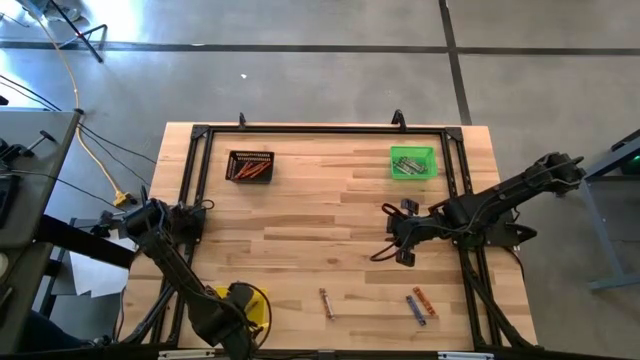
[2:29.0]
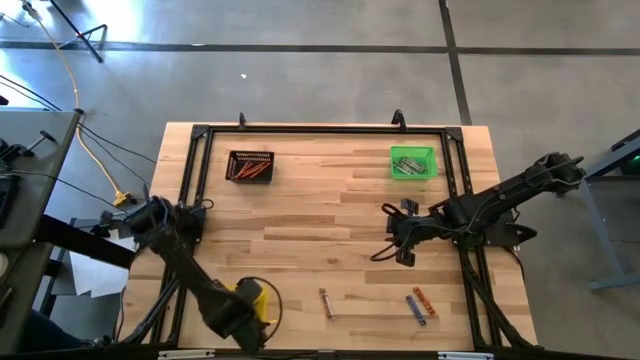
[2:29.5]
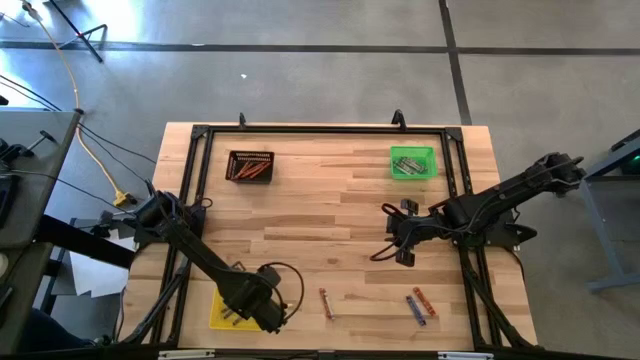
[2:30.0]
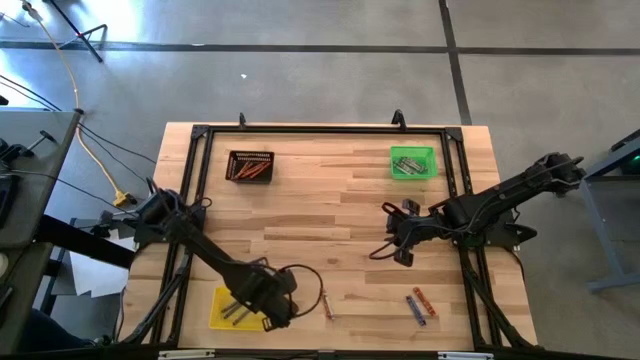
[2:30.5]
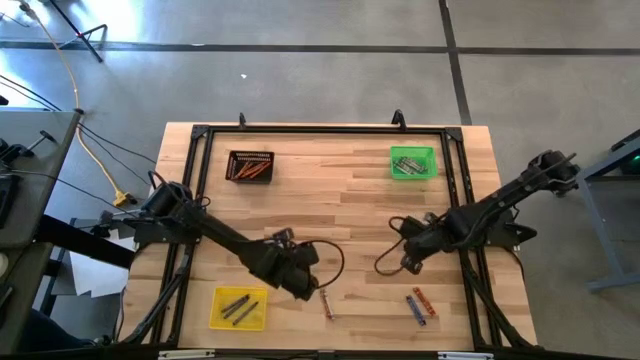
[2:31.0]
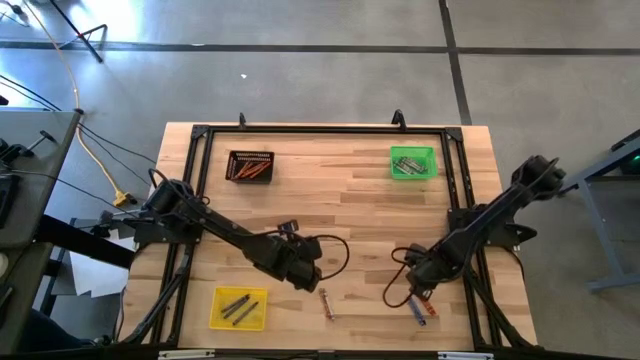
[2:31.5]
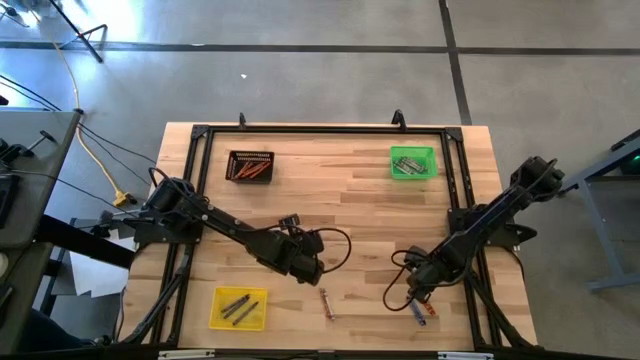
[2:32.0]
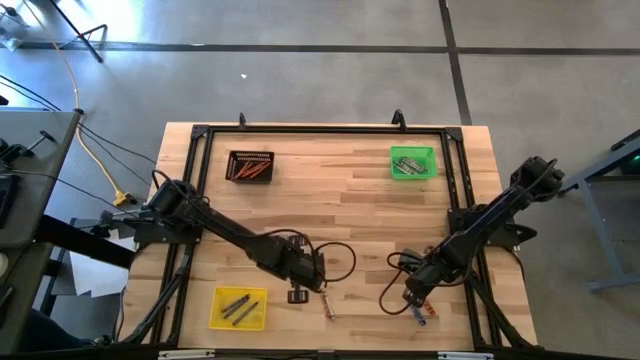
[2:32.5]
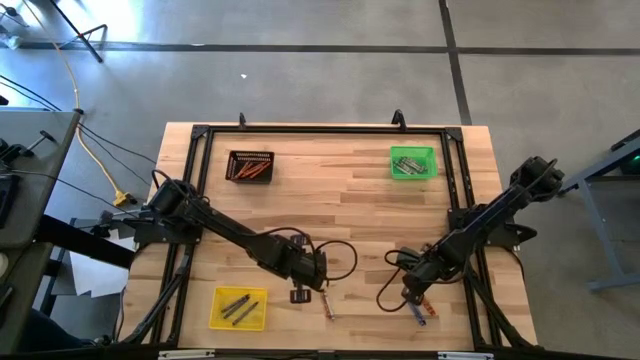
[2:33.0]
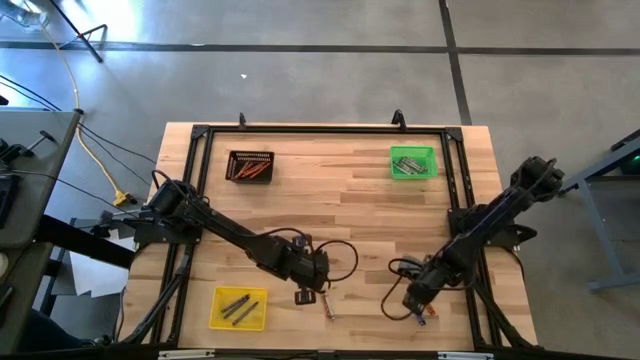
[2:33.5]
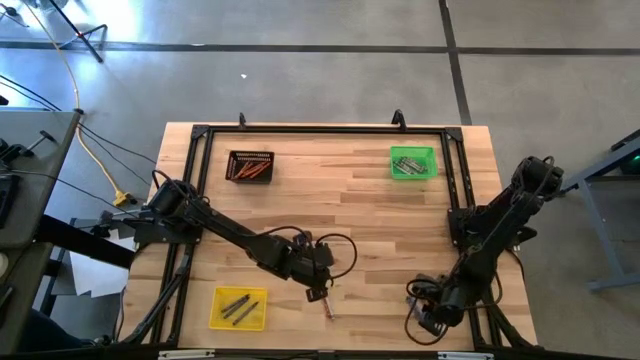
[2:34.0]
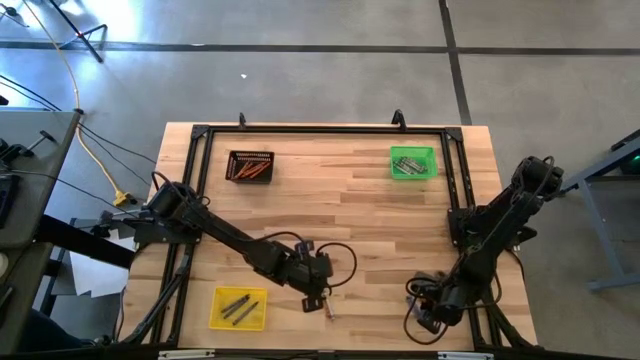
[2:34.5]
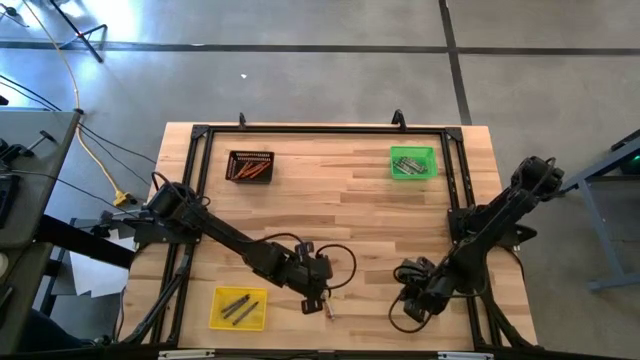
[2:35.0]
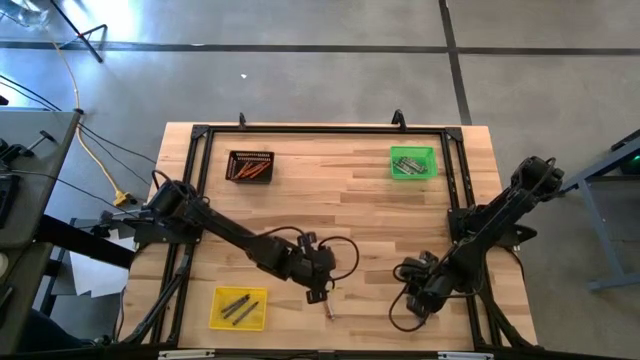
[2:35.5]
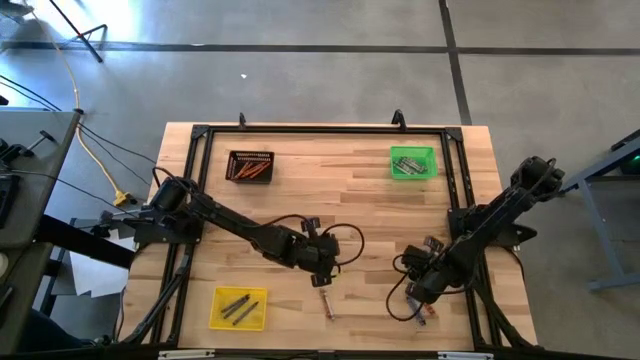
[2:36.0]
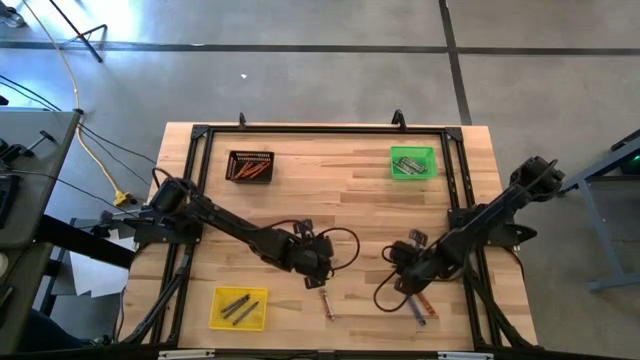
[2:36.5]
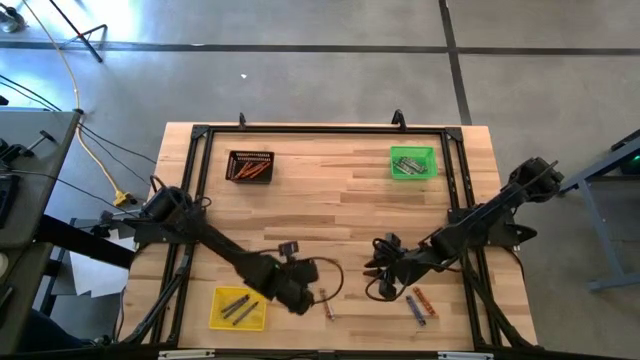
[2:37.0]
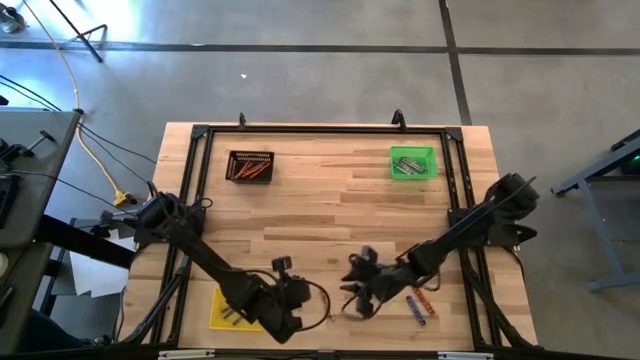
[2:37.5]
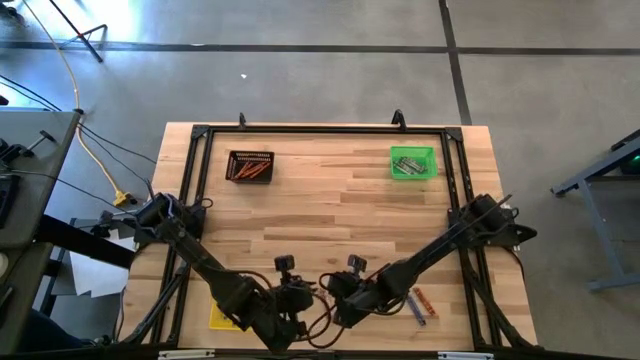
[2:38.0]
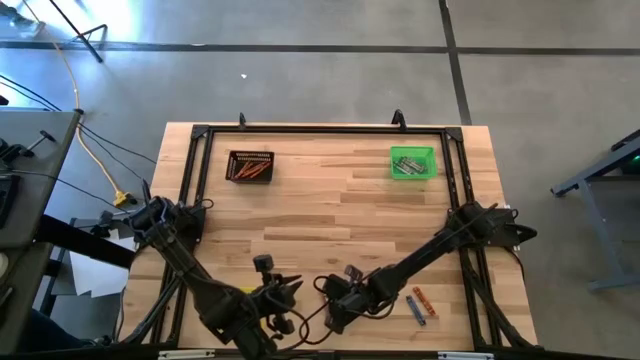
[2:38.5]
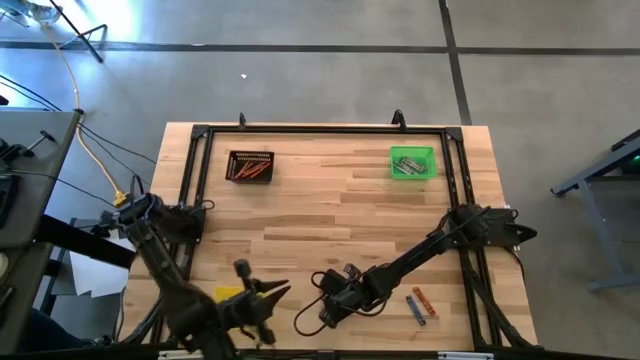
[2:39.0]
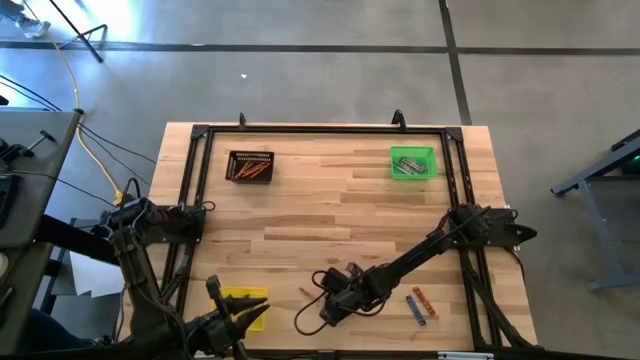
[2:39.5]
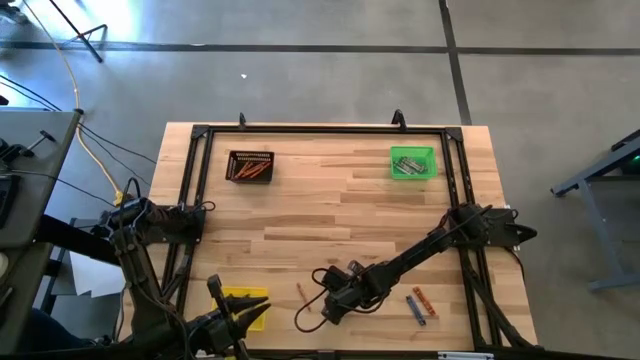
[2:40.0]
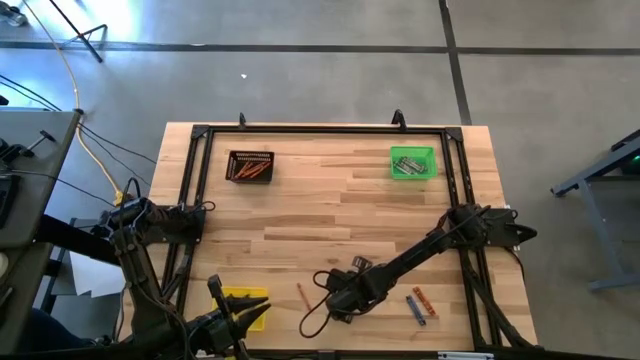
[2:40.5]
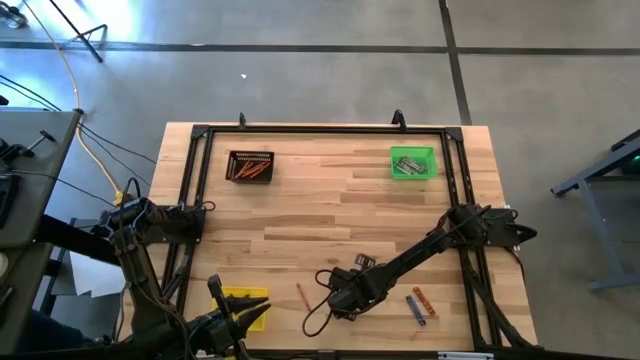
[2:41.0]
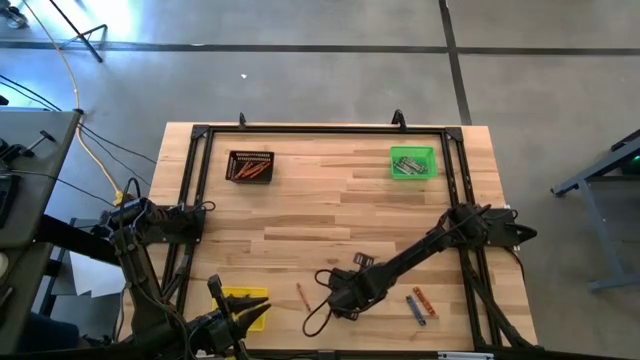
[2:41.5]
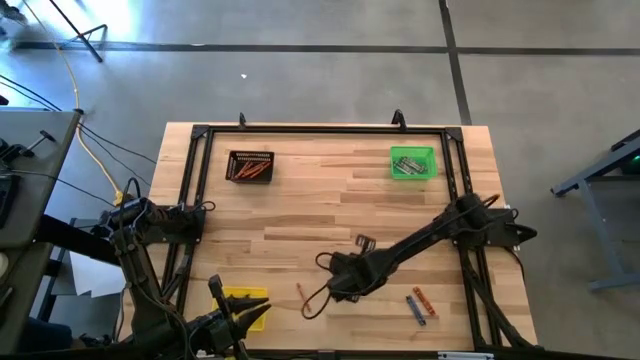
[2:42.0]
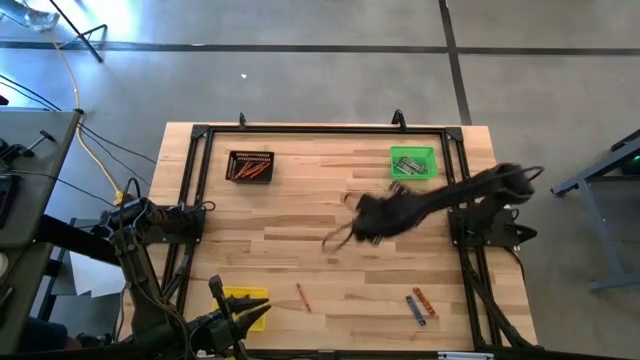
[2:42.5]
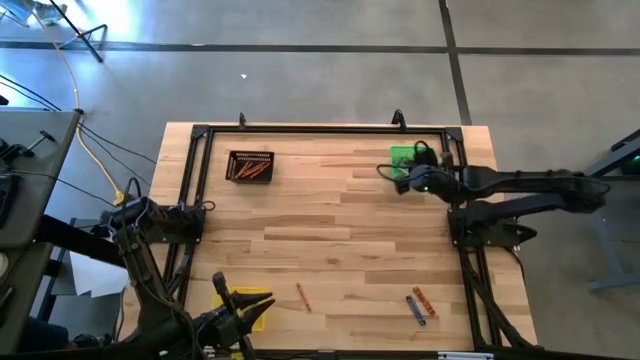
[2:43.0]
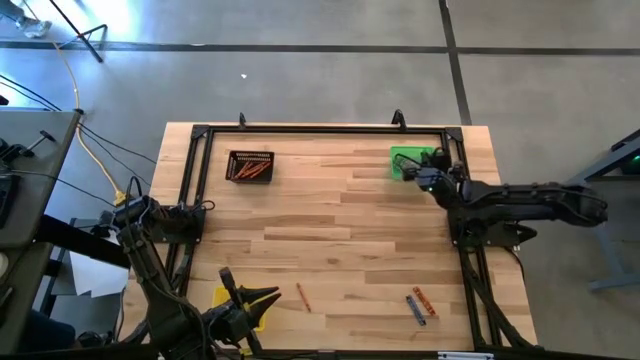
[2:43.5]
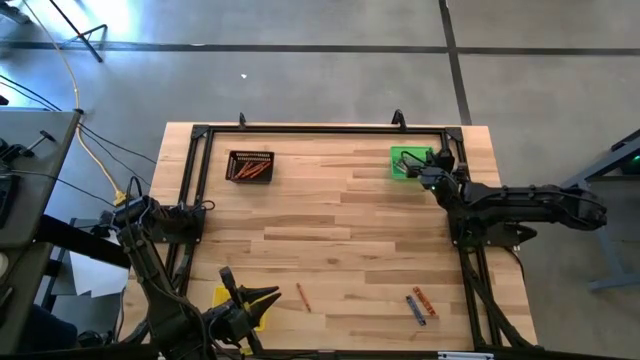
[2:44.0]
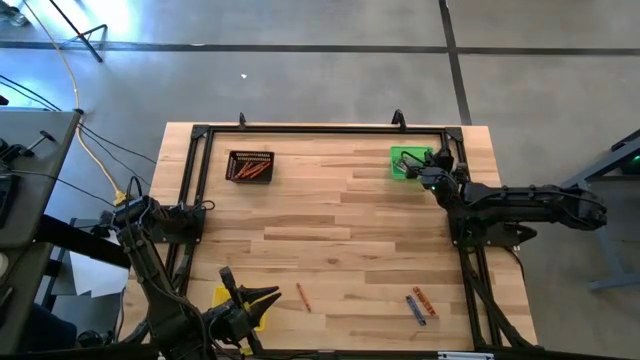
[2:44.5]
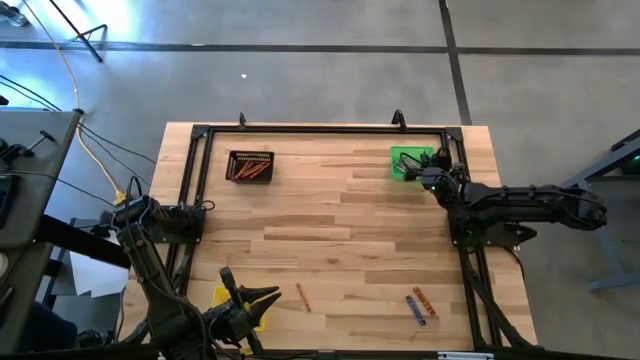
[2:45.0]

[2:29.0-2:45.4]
Task: Sort crayons
Put the gray crayon into the green bin

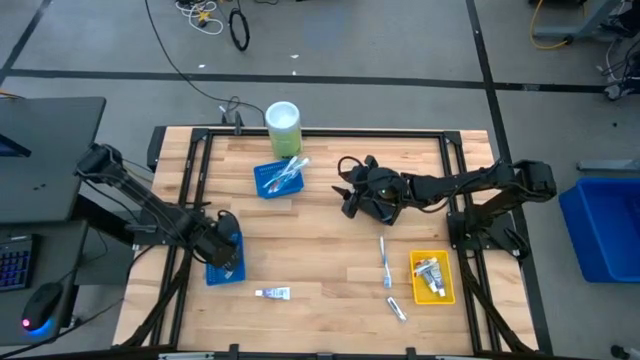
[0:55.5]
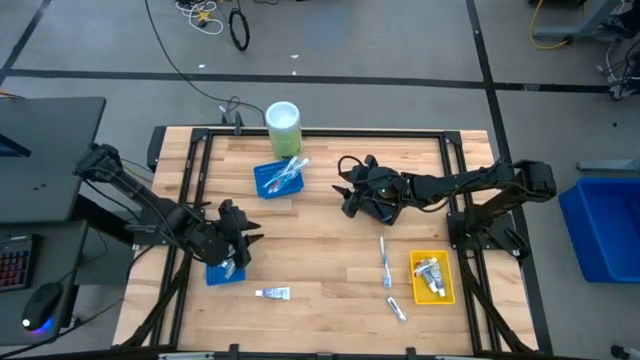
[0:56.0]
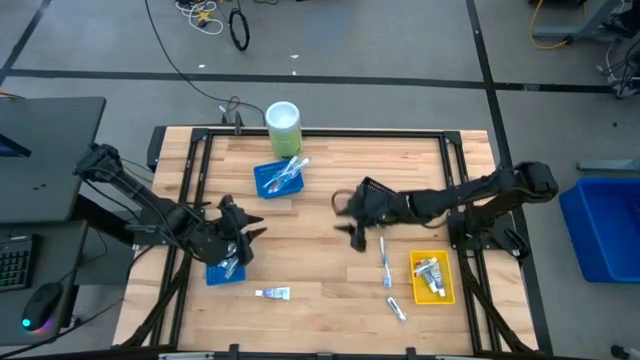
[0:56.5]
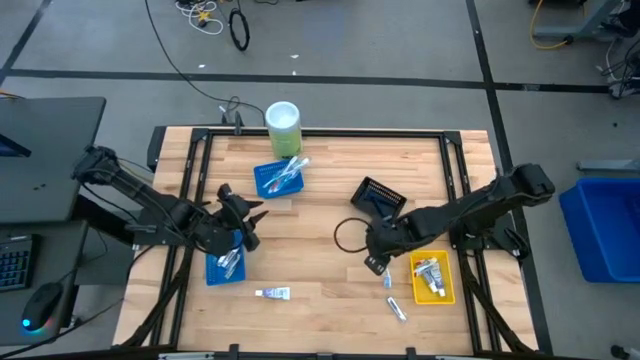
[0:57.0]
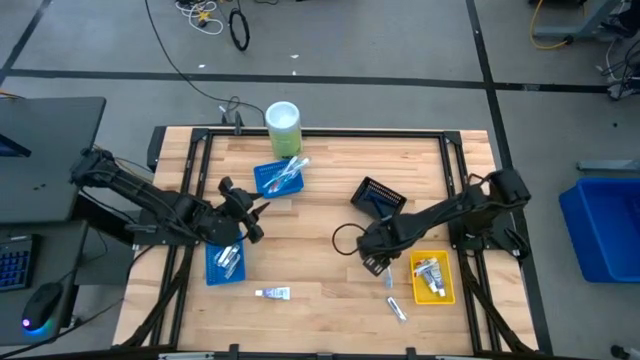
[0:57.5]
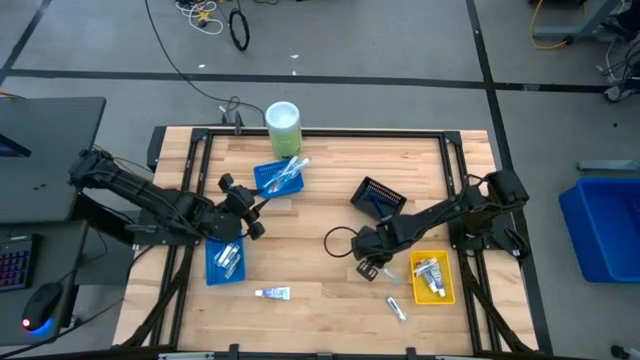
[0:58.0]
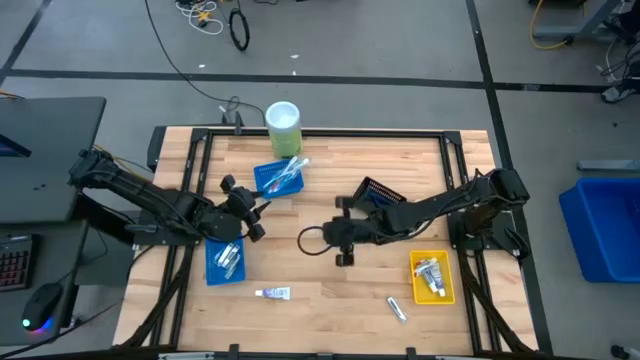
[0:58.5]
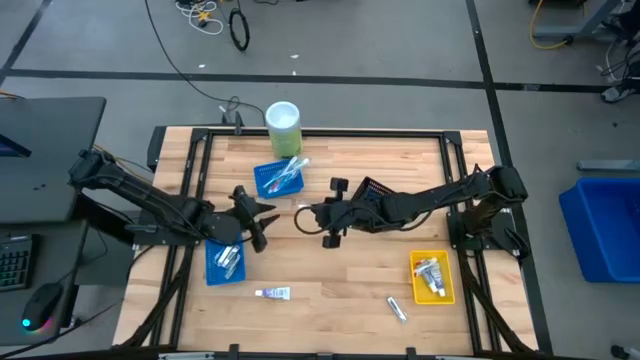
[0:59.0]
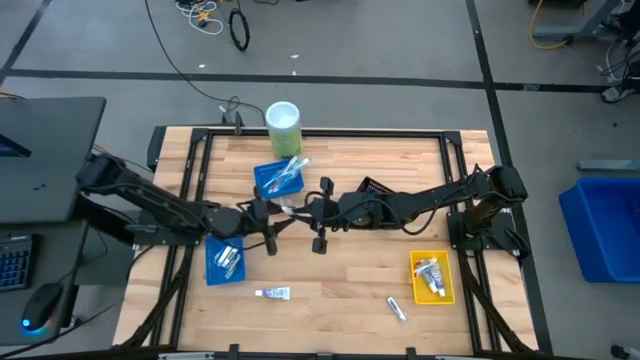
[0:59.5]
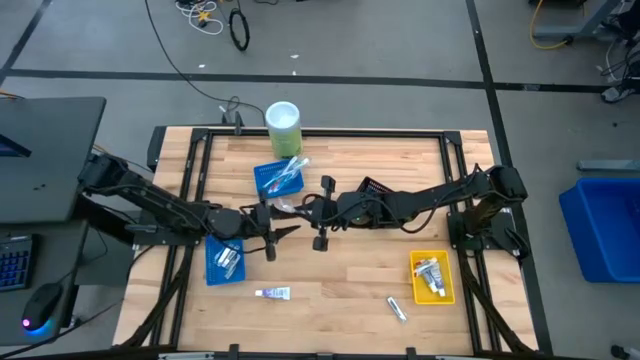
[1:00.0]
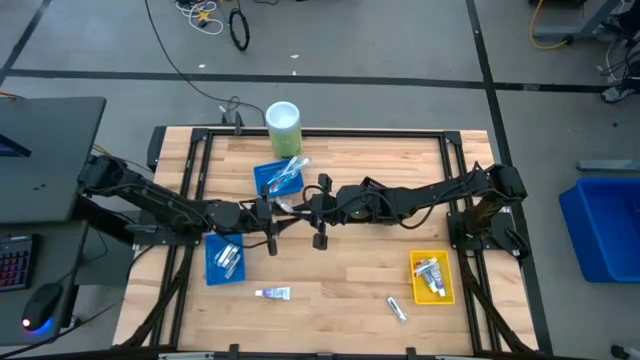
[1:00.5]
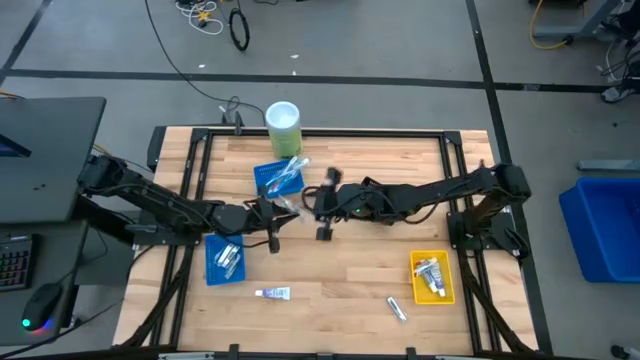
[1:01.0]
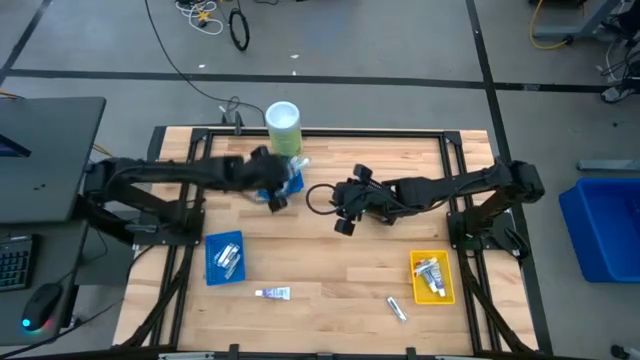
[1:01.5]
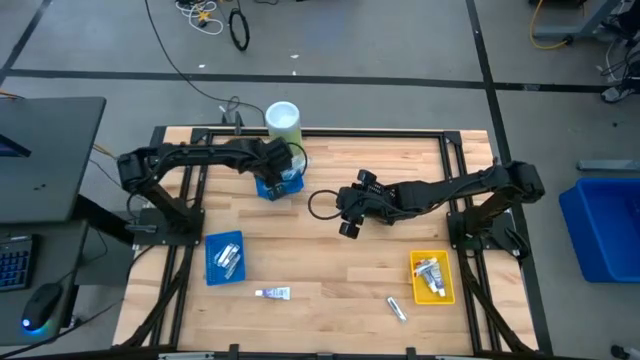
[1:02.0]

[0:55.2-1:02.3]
Task: Pick & Place Travel size toiletries
Put the blue toothbrush into the top blue bin
